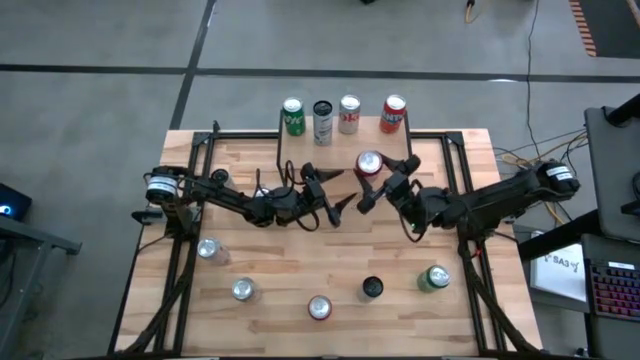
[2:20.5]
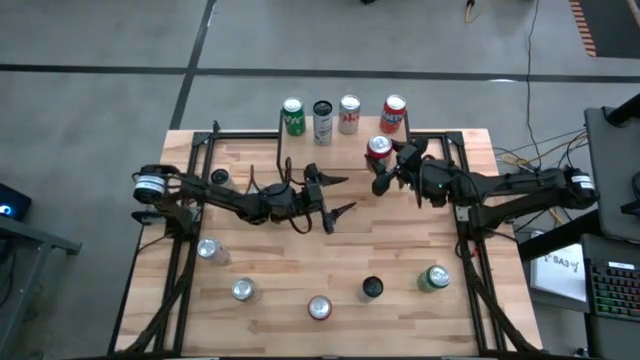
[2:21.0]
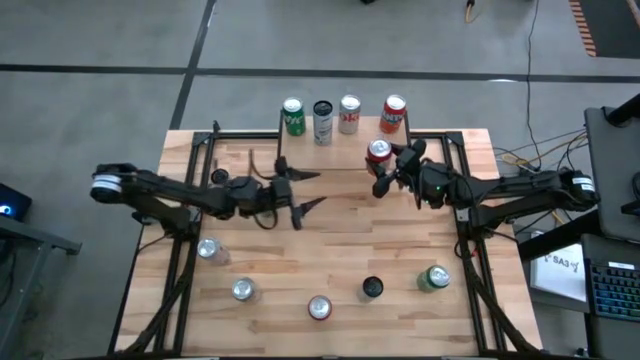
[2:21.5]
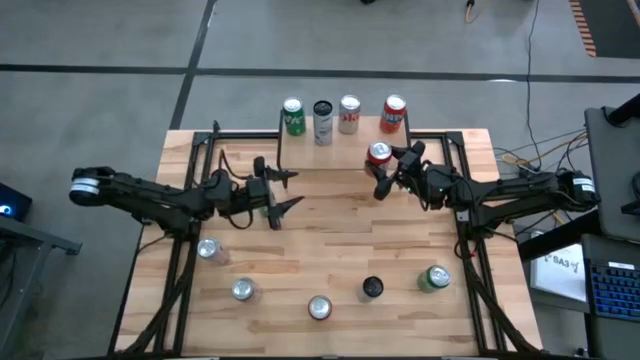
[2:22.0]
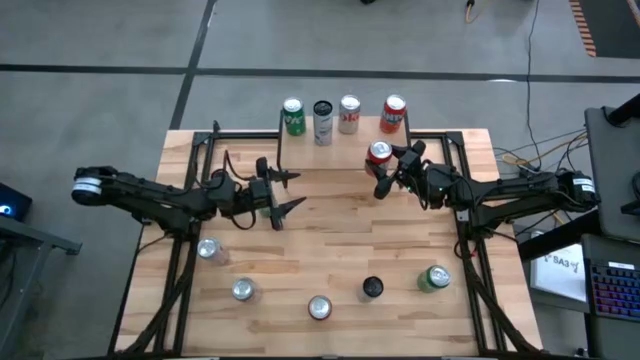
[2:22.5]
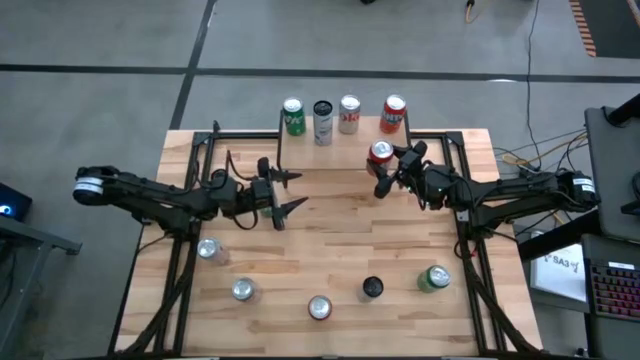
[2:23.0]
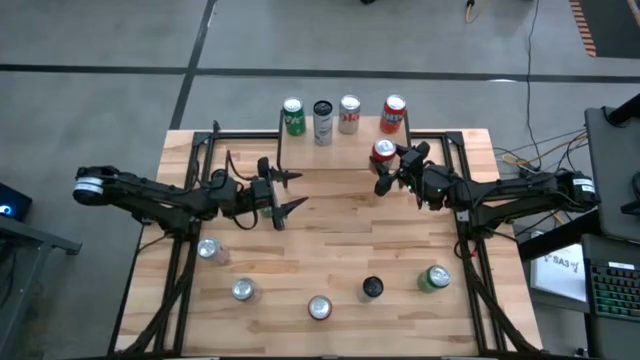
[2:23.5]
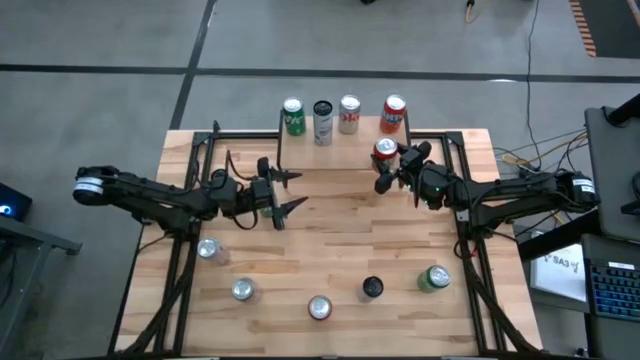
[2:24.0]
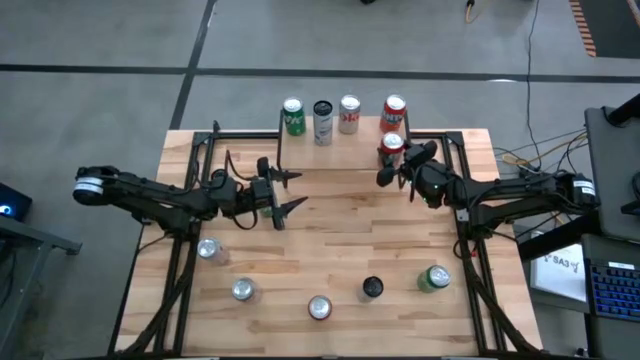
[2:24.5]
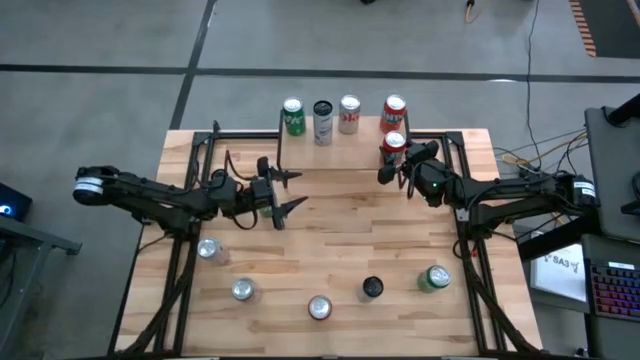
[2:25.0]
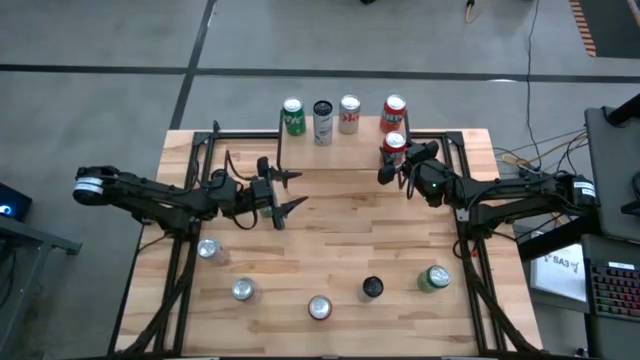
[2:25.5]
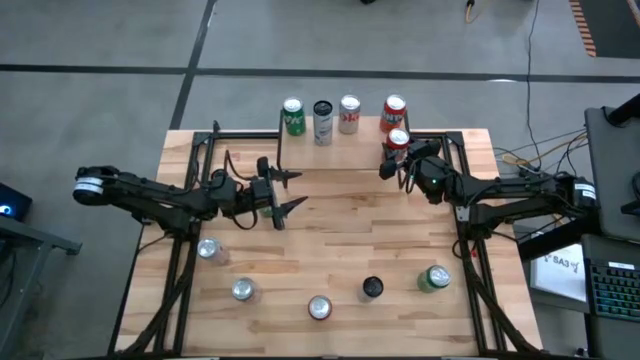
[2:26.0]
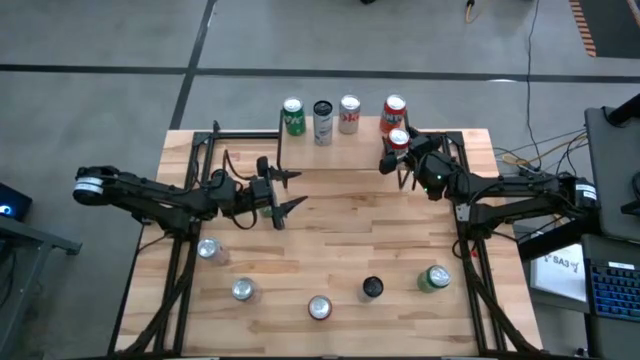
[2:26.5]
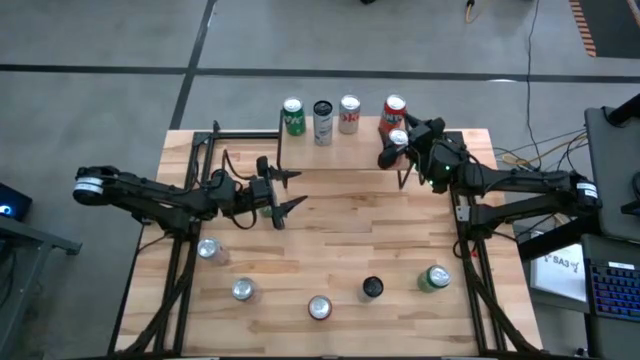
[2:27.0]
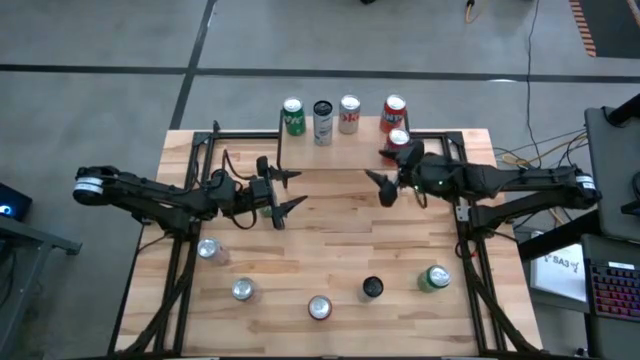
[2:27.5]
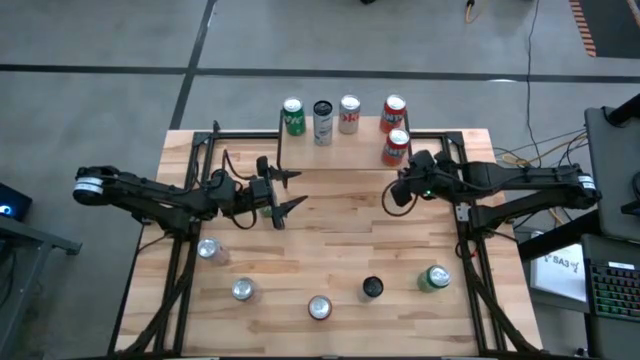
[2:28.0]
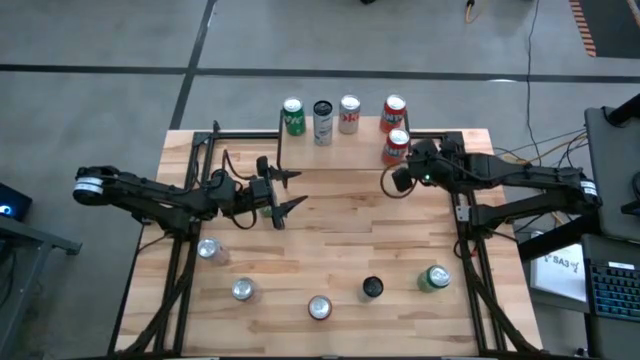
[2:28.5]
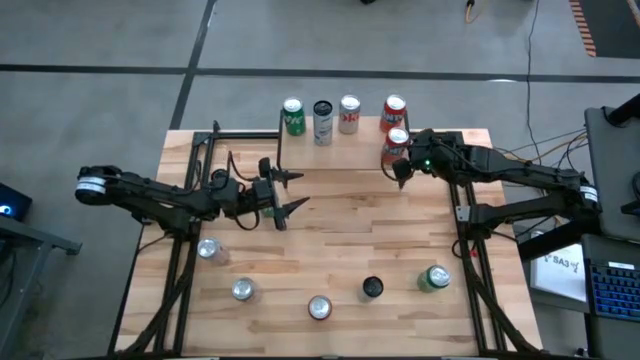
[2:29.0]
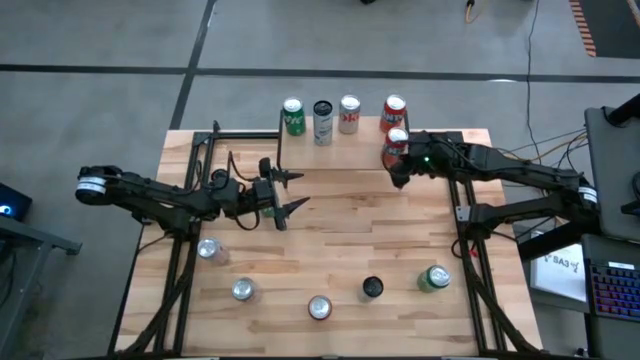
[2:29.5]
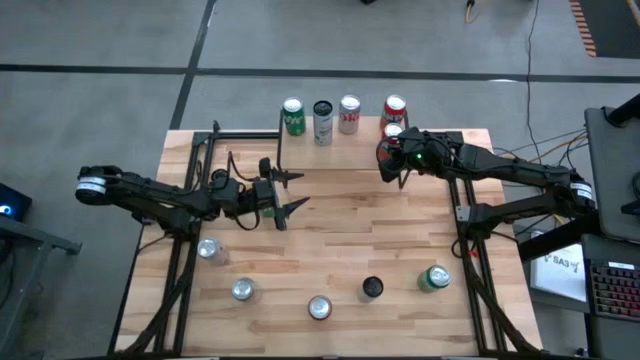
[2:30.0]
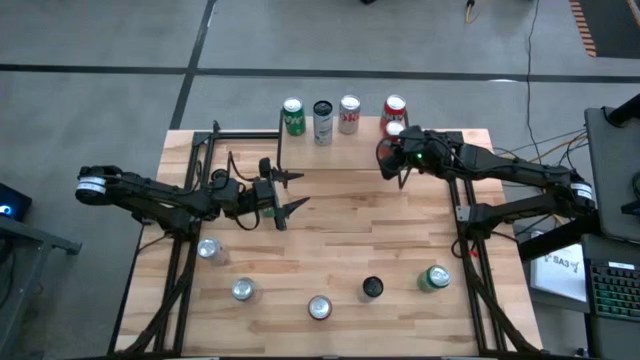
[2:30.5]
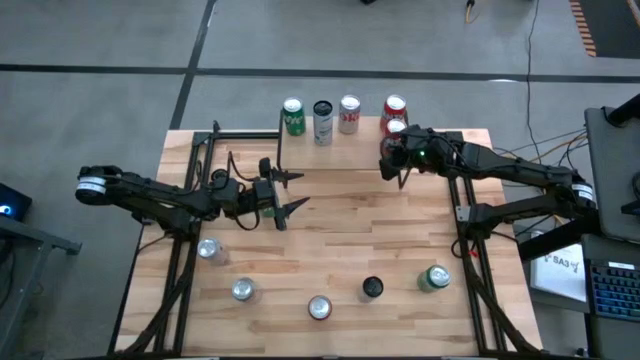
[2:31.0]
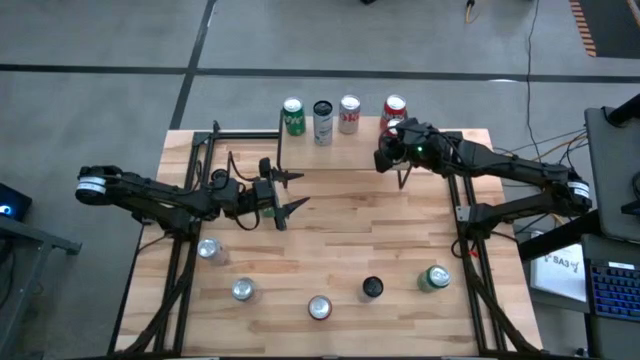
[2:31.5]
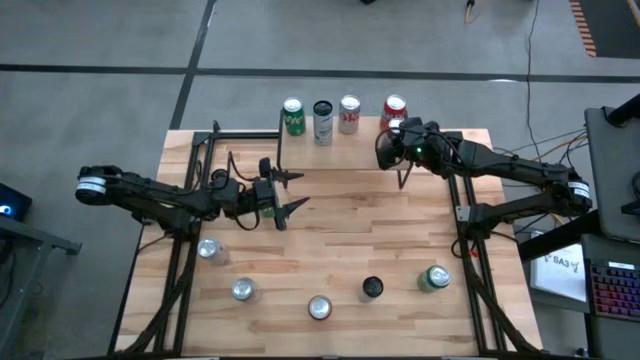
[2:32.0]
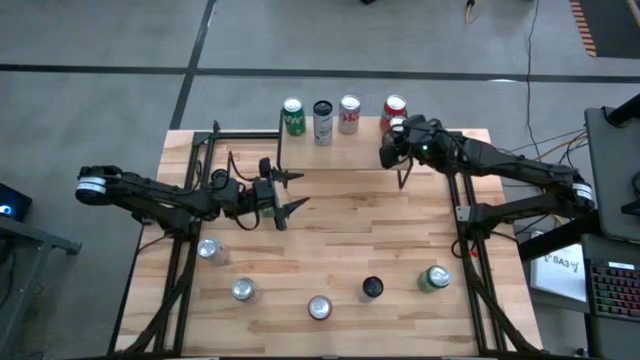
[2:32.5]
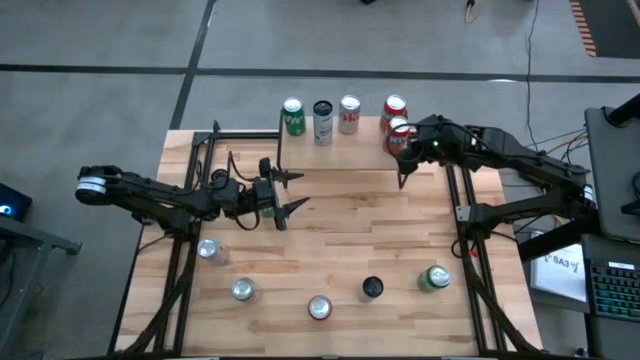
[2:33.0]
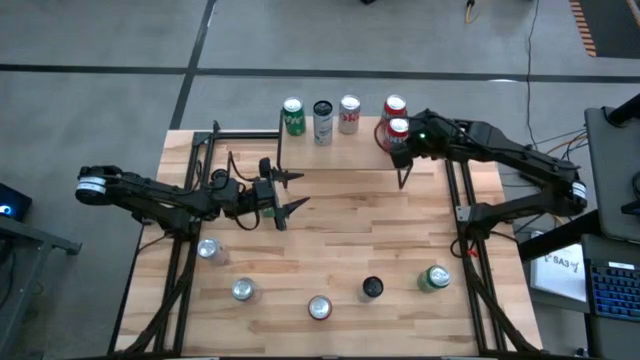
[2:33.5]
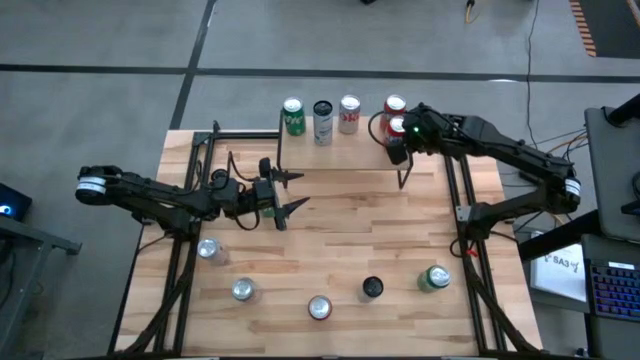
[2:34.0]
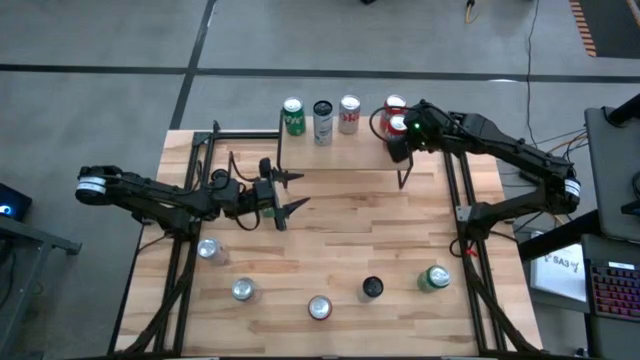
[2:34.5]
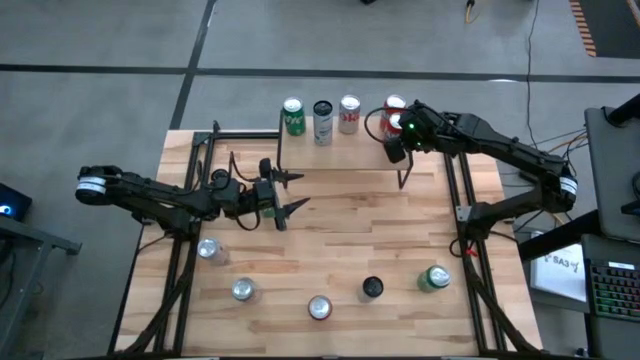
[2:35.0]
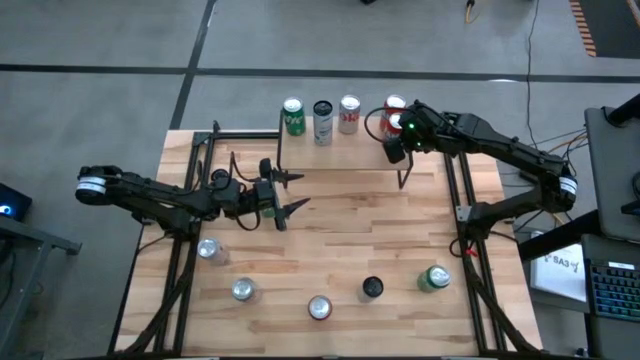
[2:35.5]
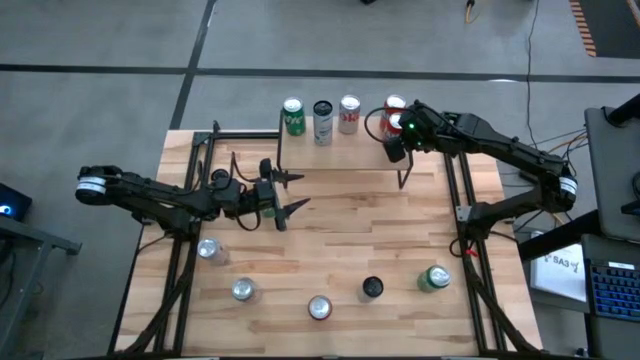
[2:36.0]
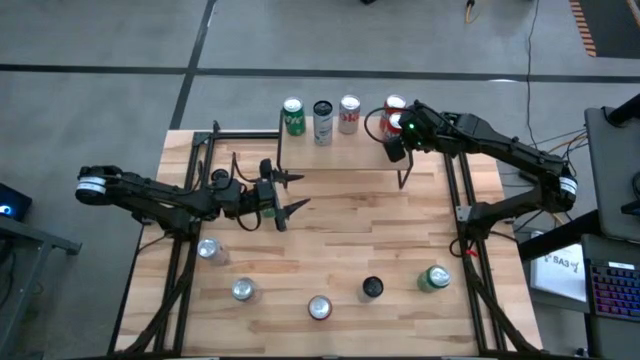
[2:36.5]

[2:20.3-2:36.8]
Task: Place canned beverage on shelf
Put the top orange soda can on the shelf aligned with the other orange soda can
